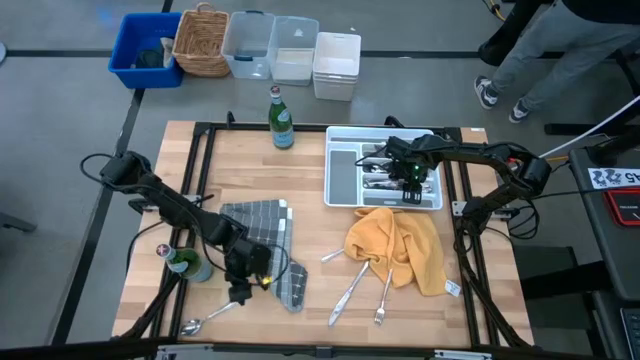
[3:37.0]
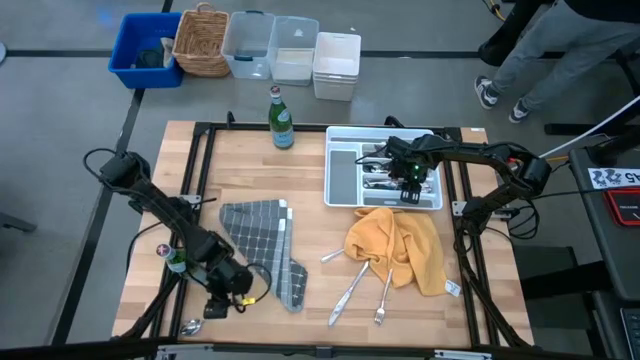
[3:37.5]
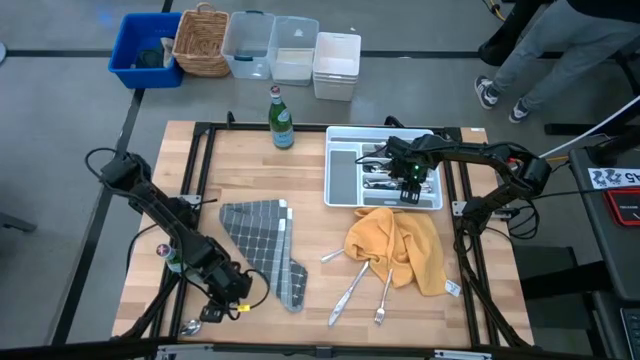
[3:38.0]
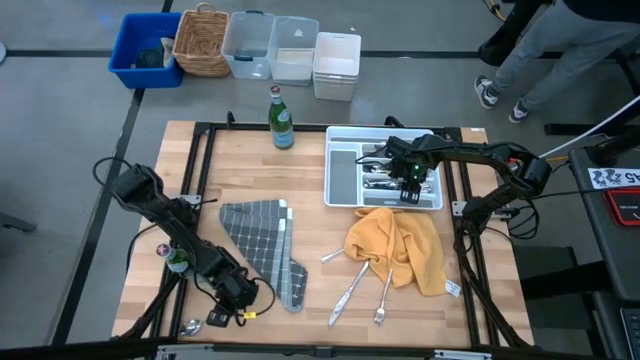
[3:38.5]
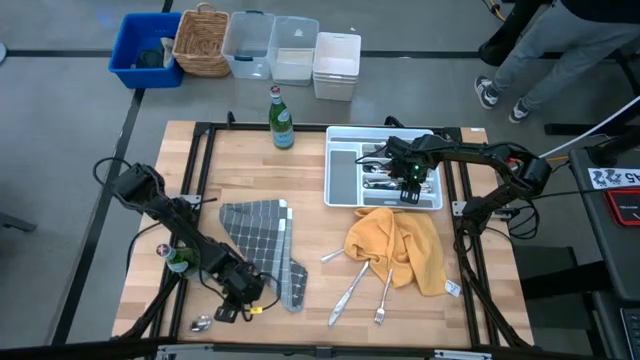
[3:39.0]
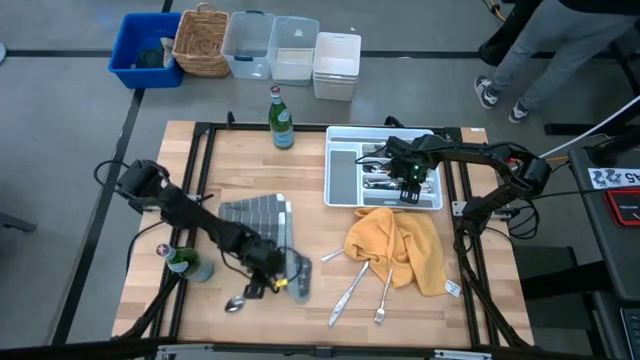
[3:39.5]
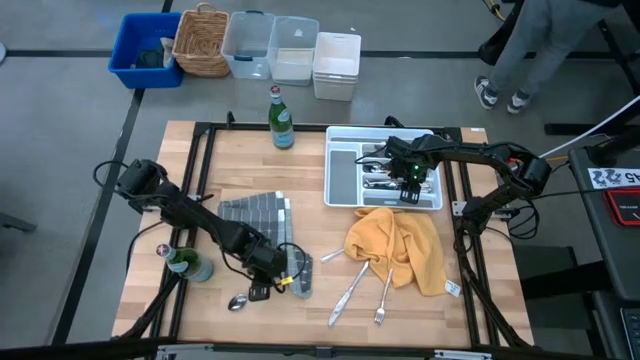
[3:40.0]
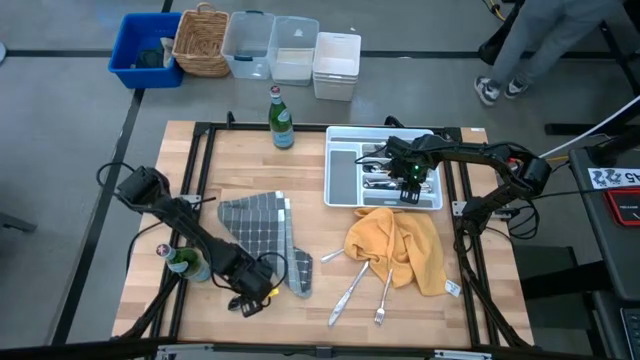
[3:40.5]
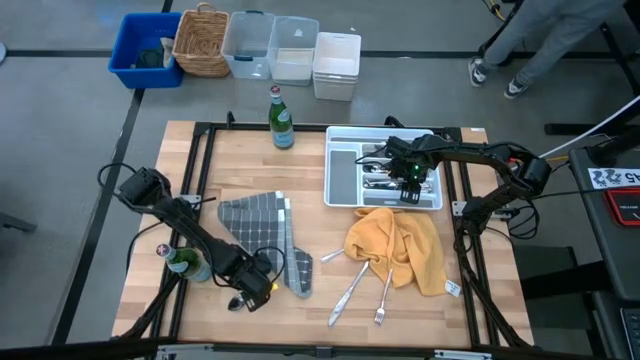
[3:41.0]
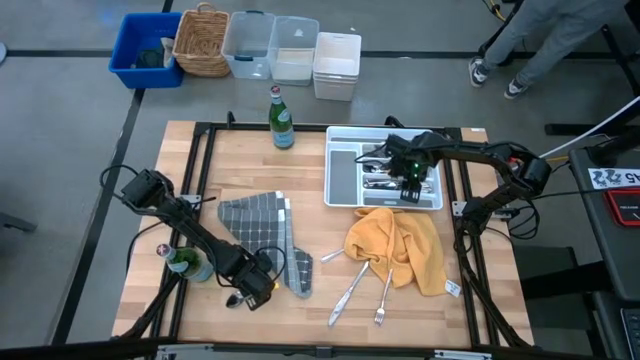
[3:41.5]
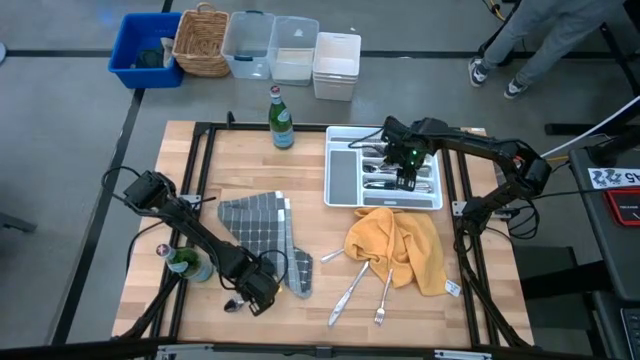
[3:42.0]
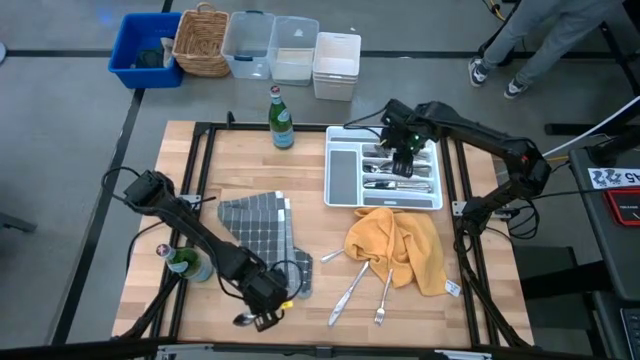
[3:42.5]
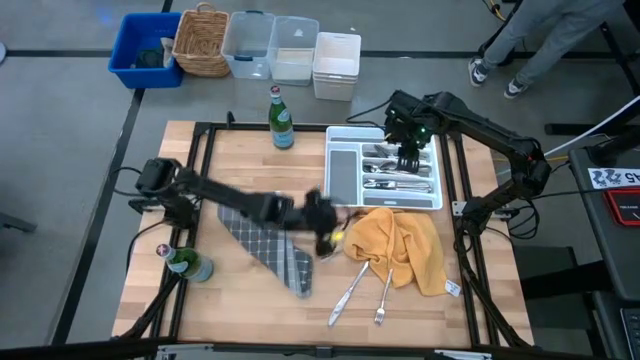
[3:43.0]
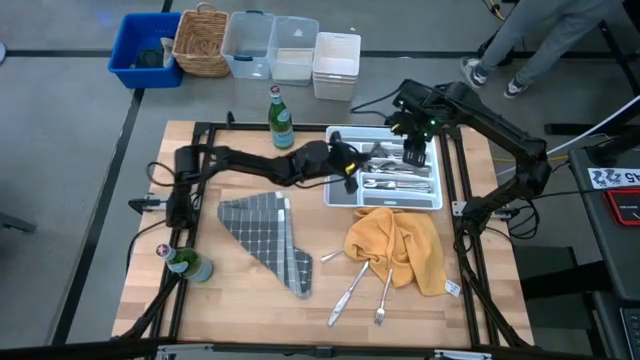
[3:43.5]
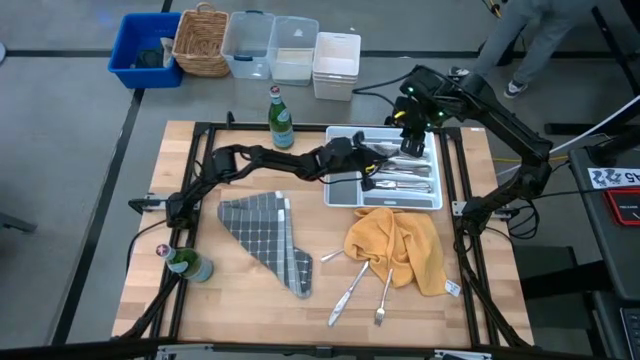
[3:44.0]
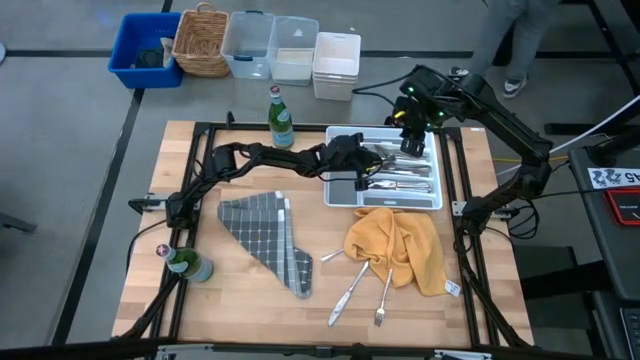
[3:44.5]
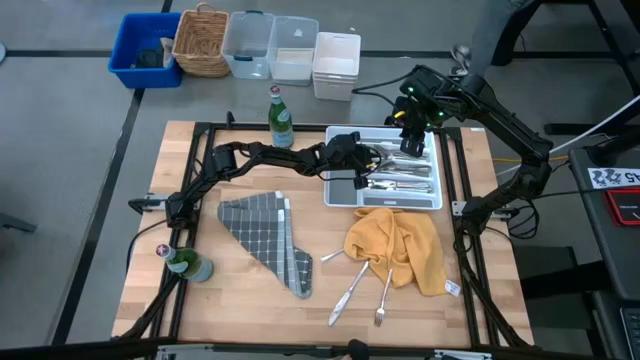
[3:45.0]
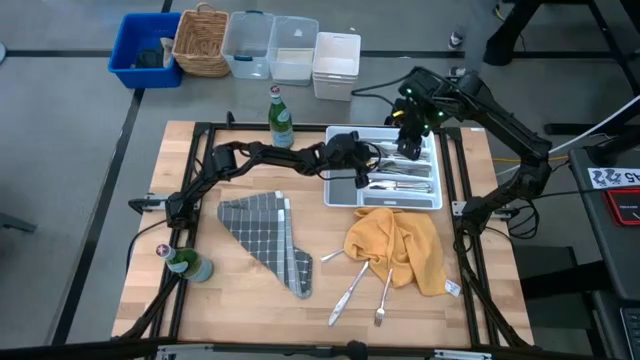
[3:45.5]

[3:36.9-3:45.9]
Put the silver spoon into the cutlery tray

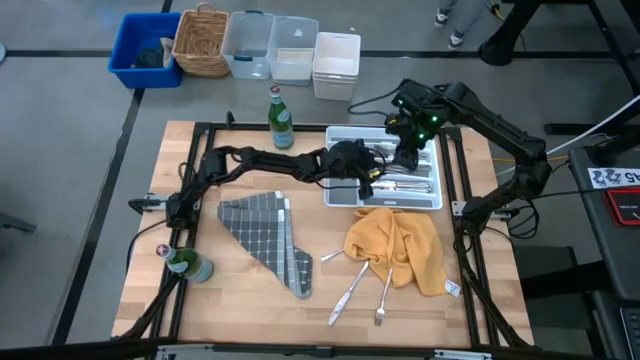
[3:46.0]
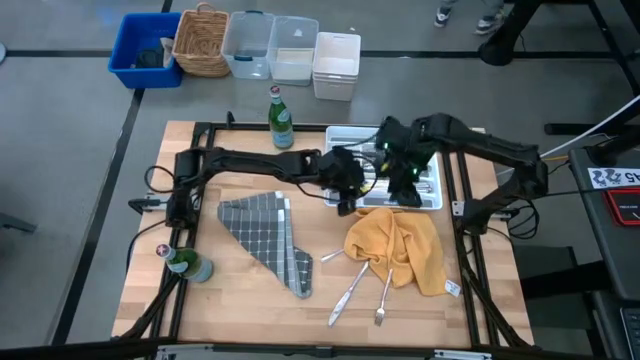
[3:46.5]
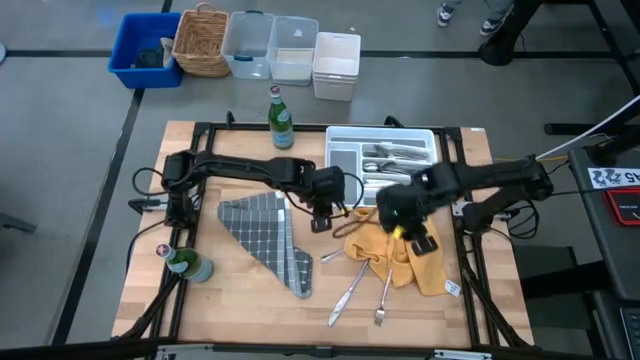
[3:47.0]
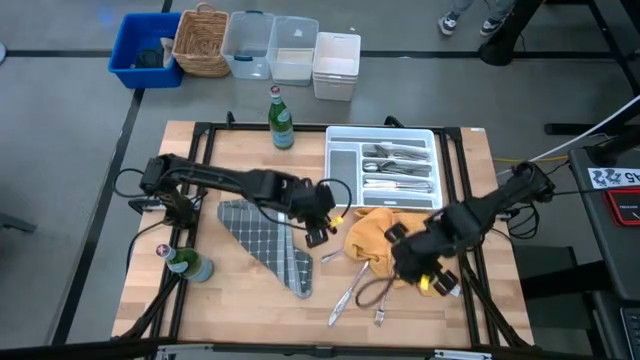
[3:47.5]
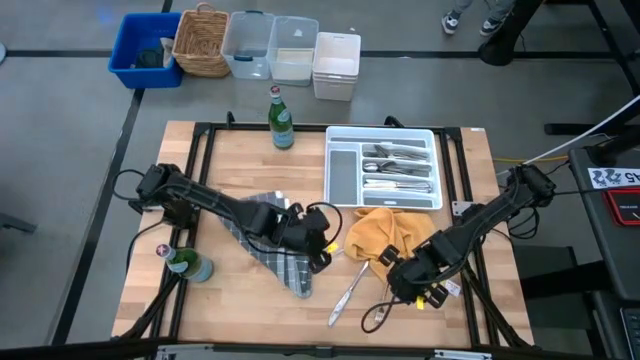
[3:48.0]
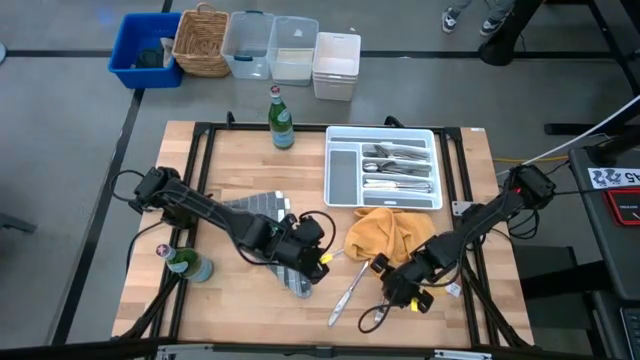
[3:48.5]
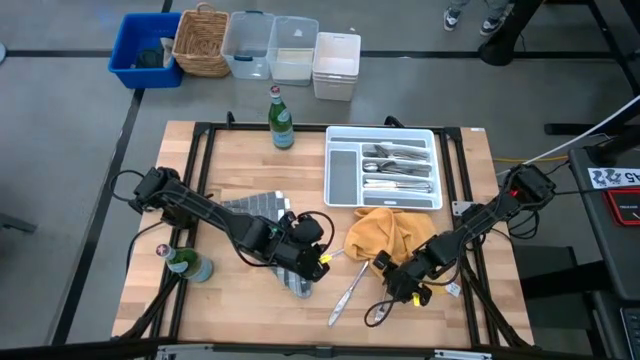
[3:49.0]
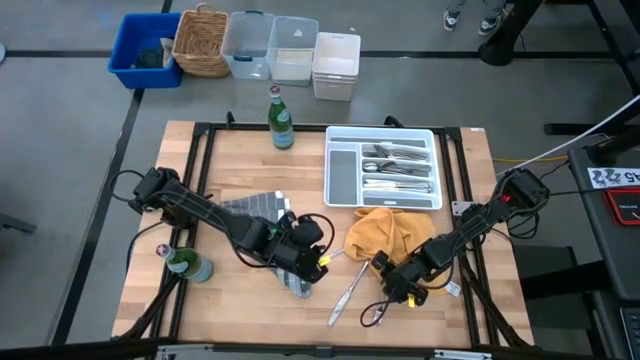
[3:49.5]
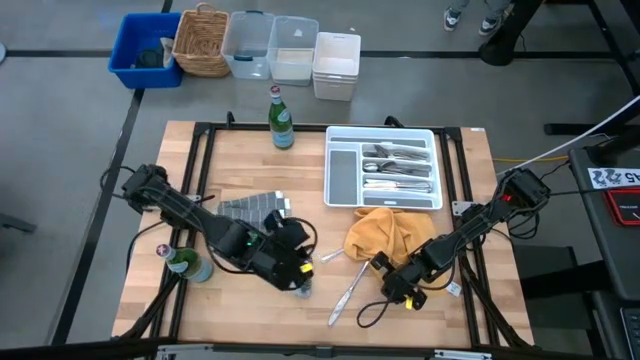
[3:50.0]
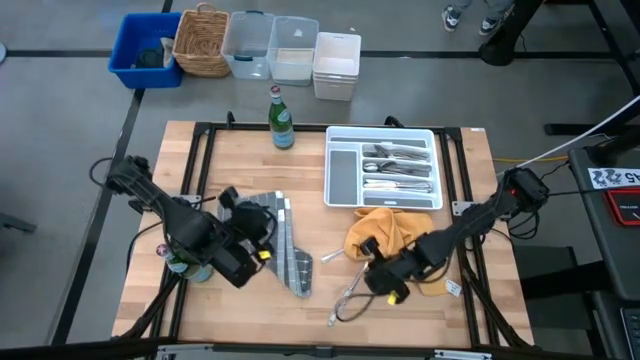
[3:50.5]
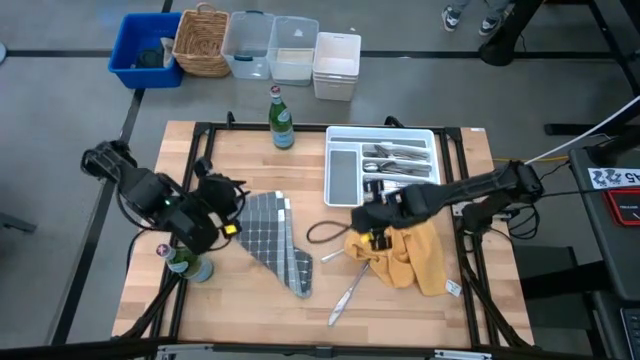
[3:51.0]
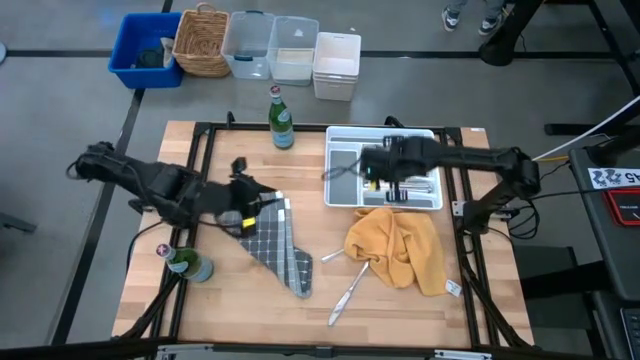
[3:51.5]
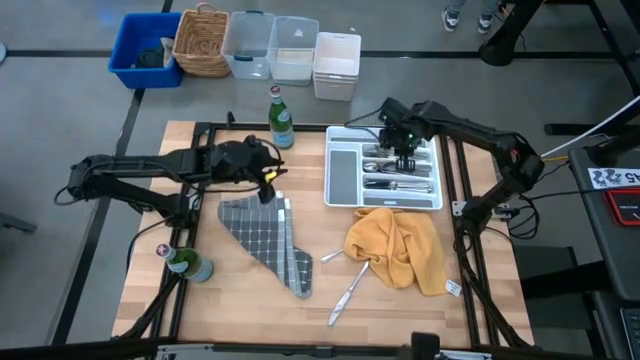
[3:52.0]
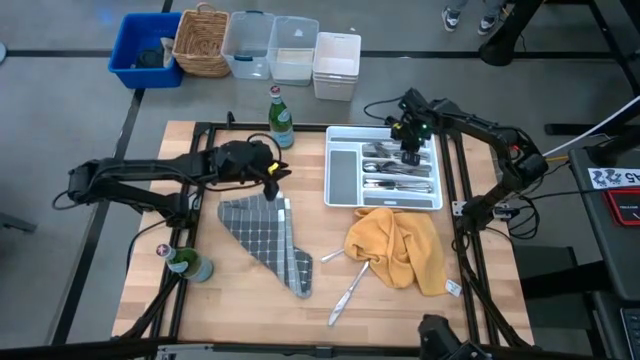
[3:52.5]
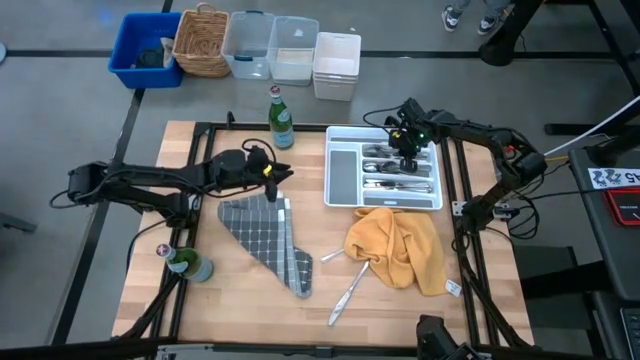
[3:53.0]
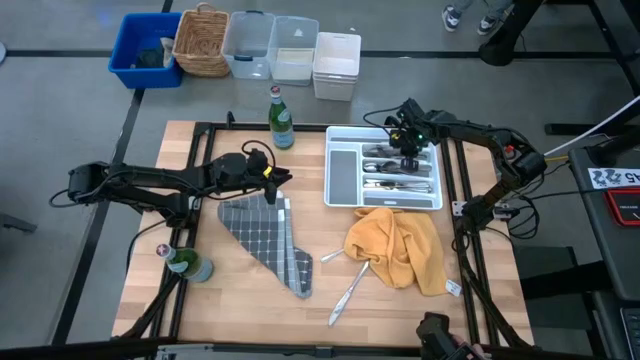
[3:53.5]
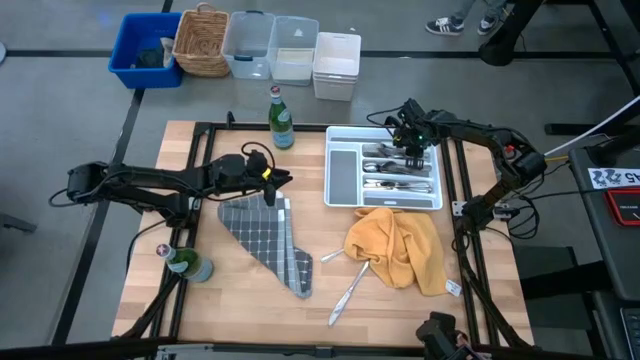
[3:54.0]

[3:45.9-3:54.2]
Put the silver fork into the cutlery tray
